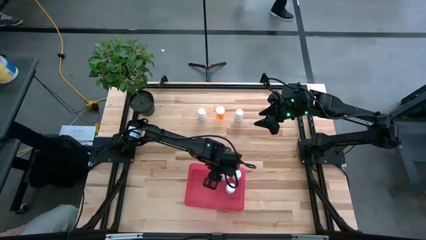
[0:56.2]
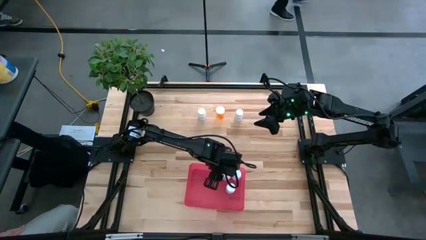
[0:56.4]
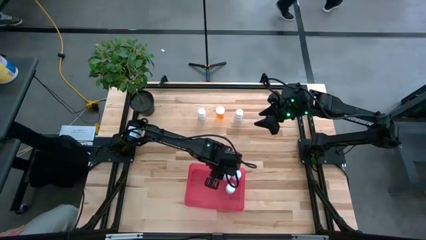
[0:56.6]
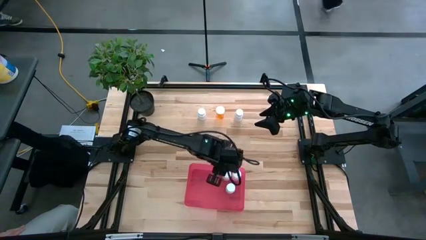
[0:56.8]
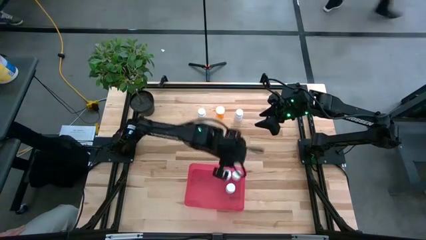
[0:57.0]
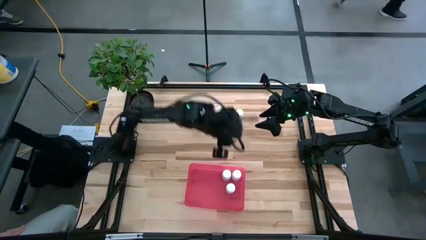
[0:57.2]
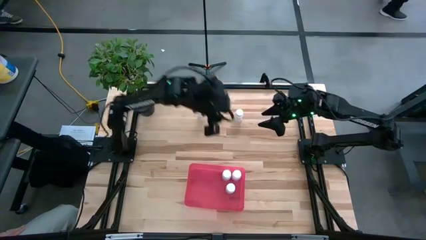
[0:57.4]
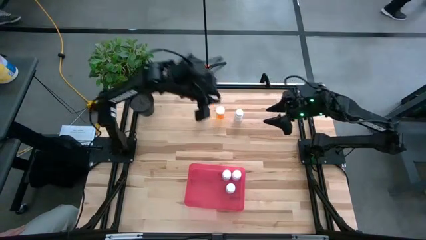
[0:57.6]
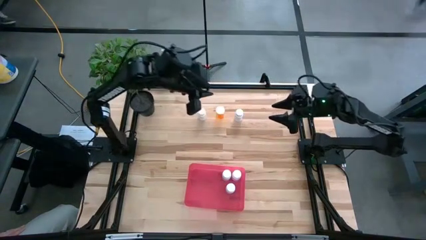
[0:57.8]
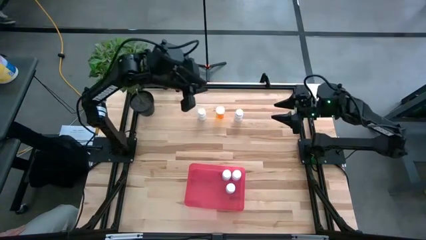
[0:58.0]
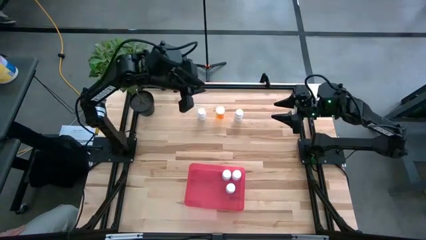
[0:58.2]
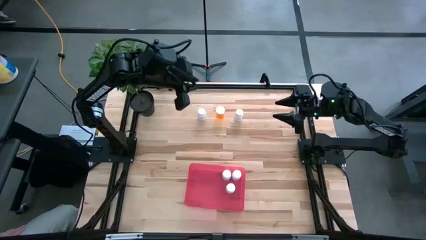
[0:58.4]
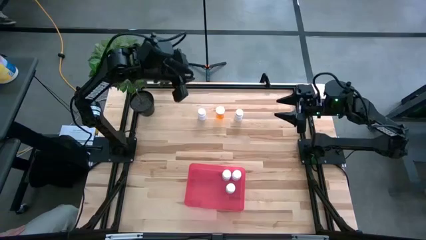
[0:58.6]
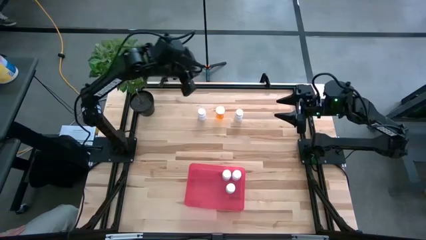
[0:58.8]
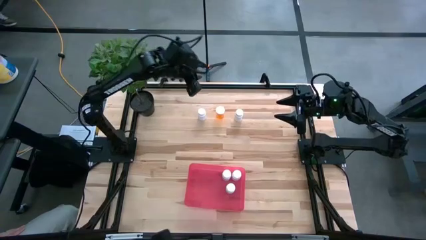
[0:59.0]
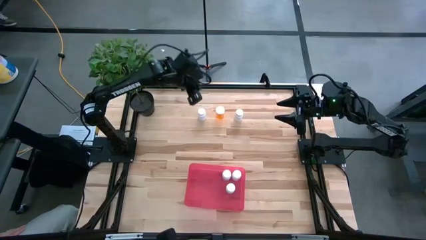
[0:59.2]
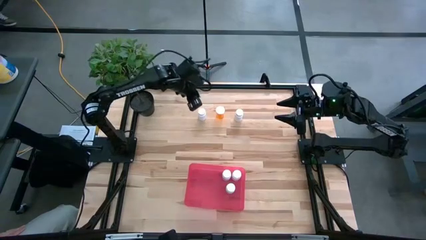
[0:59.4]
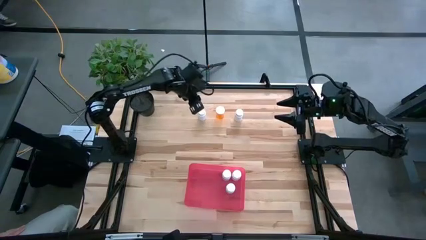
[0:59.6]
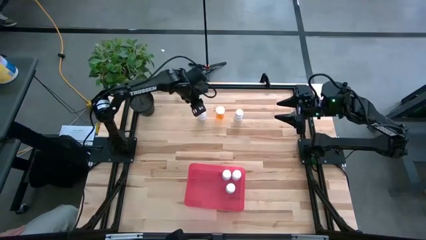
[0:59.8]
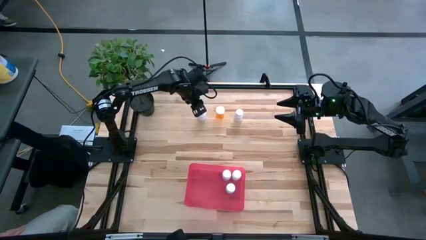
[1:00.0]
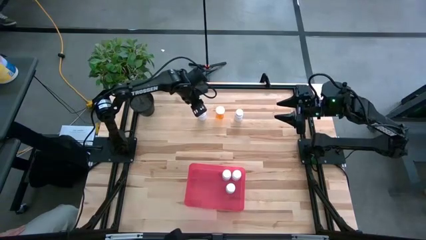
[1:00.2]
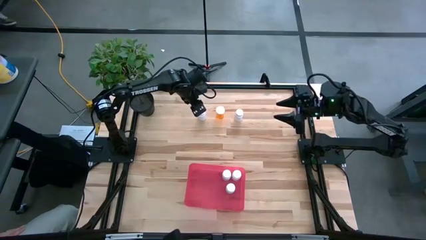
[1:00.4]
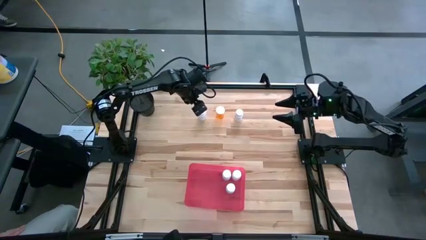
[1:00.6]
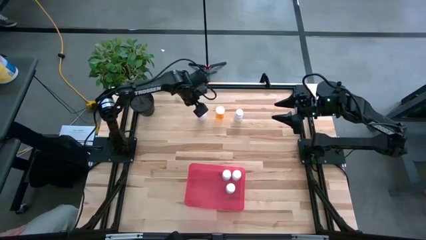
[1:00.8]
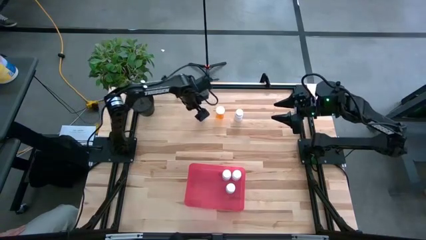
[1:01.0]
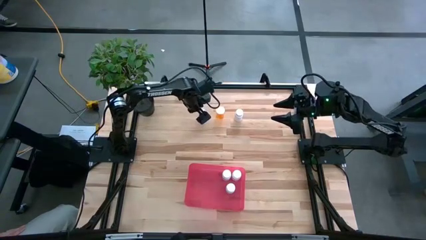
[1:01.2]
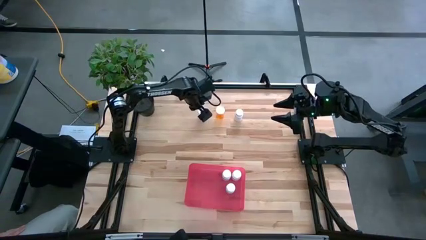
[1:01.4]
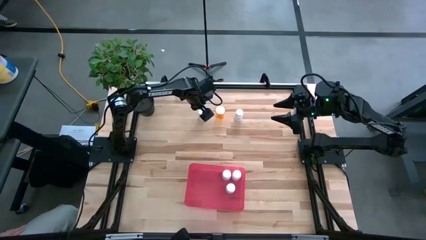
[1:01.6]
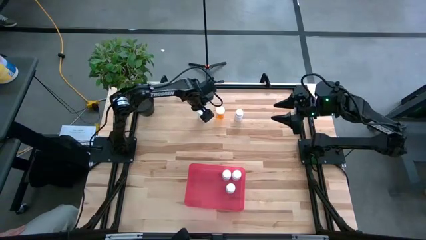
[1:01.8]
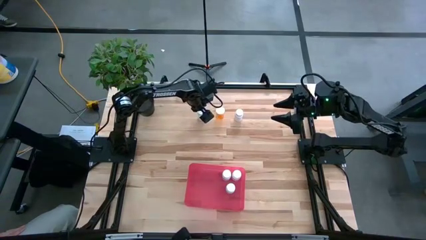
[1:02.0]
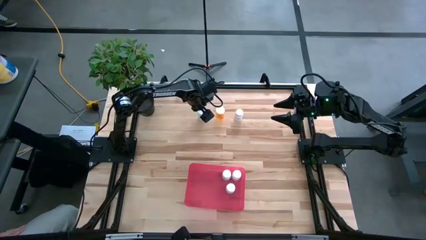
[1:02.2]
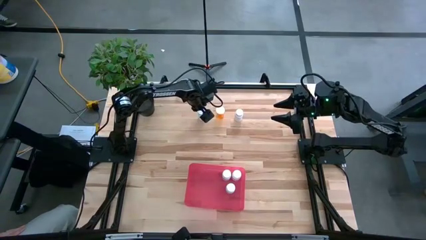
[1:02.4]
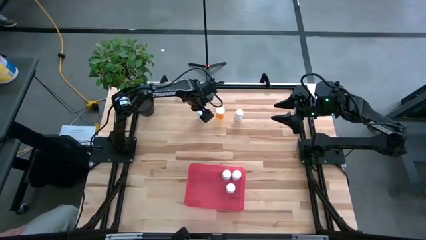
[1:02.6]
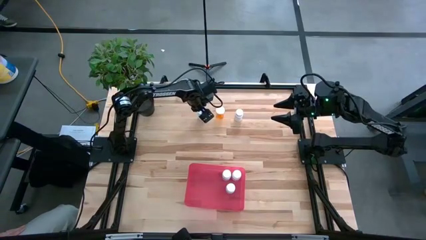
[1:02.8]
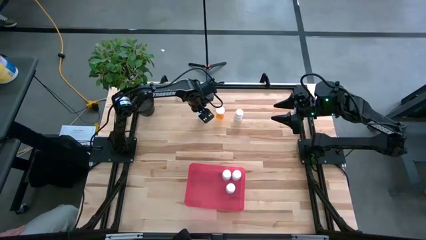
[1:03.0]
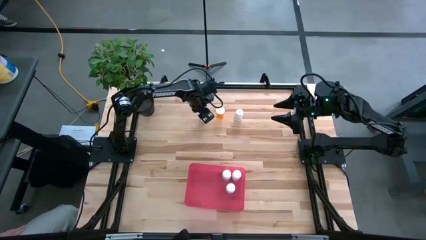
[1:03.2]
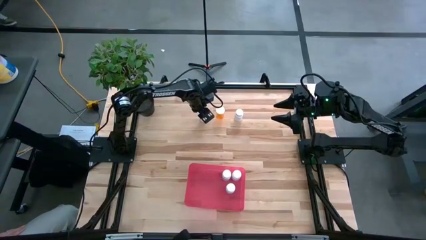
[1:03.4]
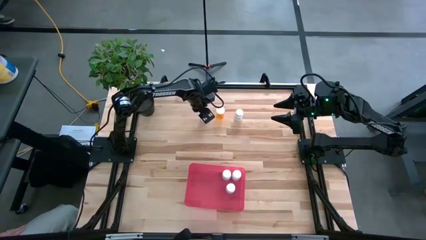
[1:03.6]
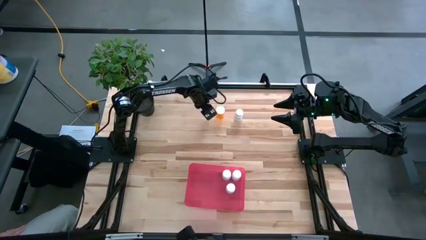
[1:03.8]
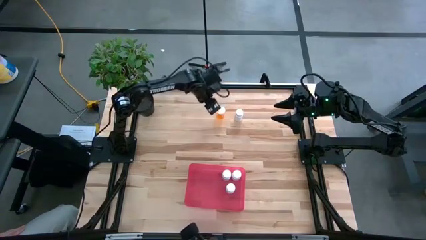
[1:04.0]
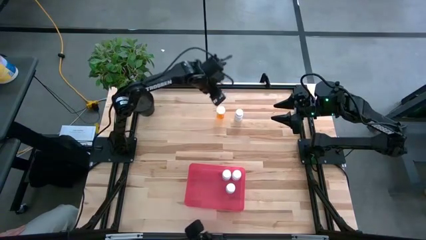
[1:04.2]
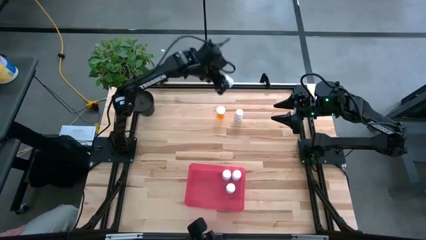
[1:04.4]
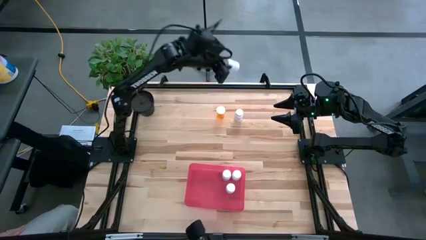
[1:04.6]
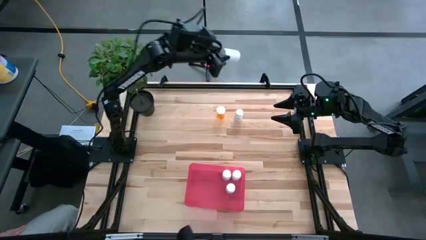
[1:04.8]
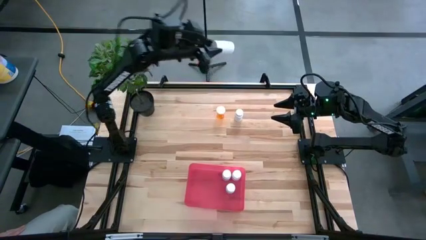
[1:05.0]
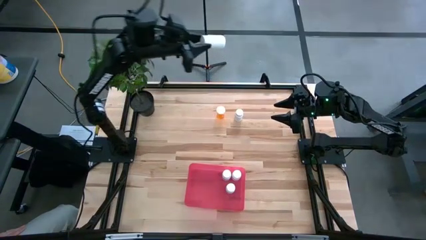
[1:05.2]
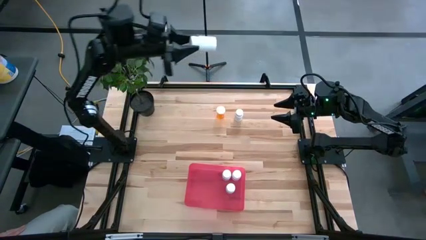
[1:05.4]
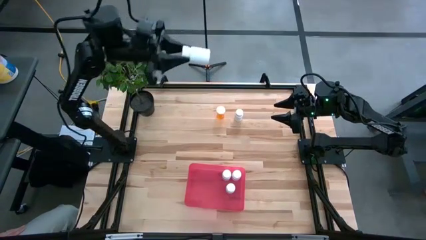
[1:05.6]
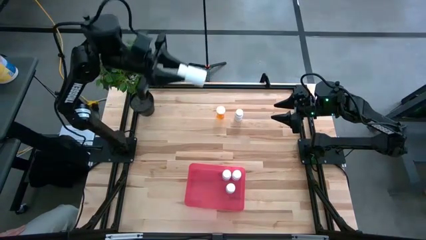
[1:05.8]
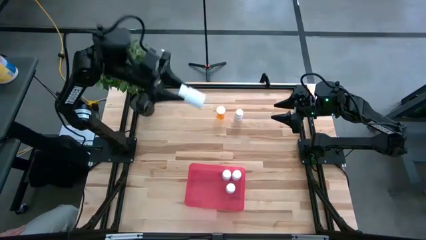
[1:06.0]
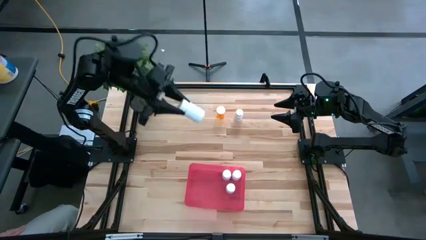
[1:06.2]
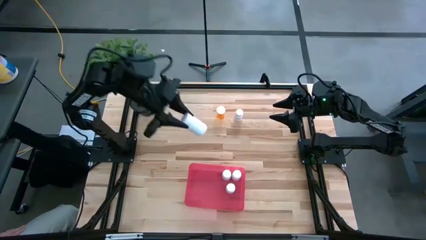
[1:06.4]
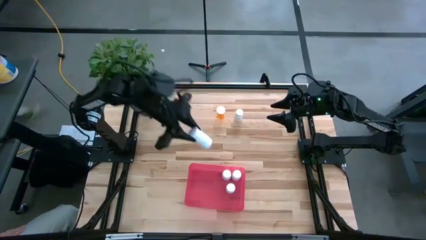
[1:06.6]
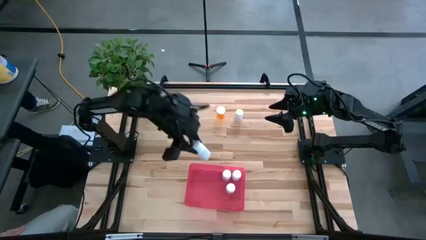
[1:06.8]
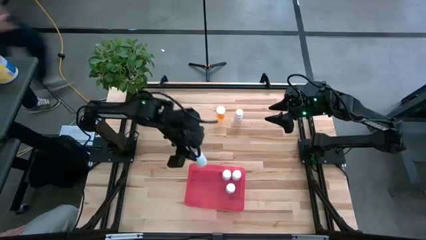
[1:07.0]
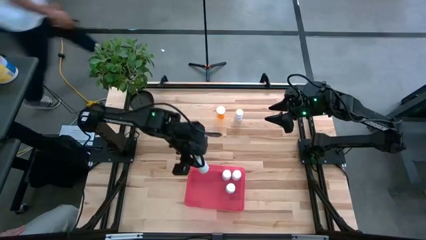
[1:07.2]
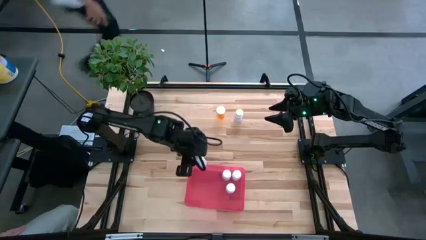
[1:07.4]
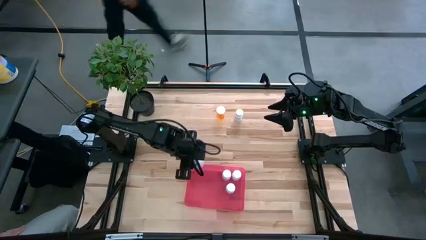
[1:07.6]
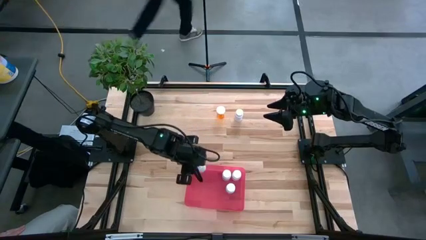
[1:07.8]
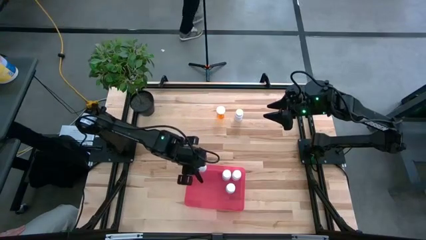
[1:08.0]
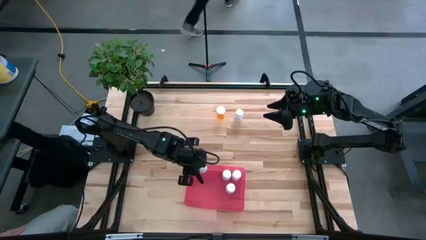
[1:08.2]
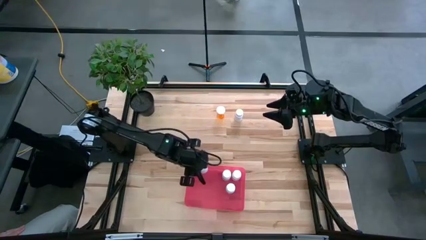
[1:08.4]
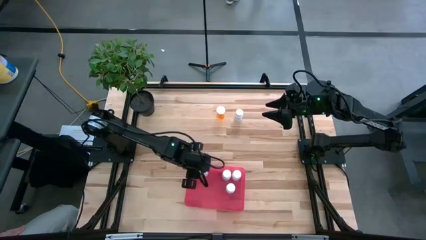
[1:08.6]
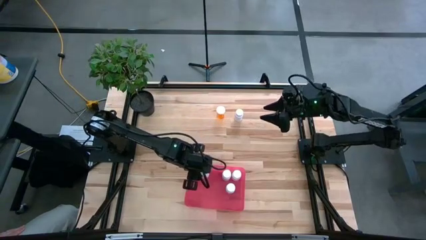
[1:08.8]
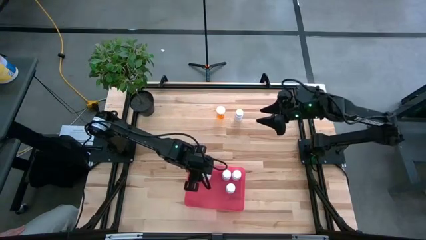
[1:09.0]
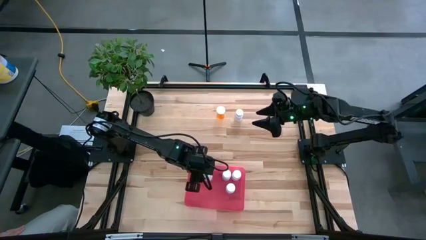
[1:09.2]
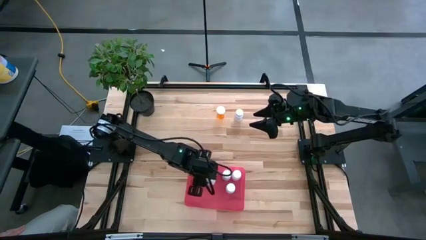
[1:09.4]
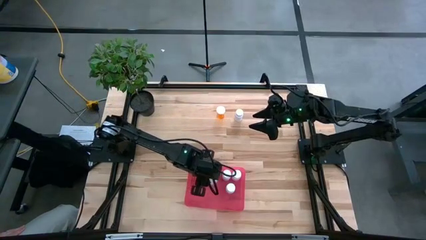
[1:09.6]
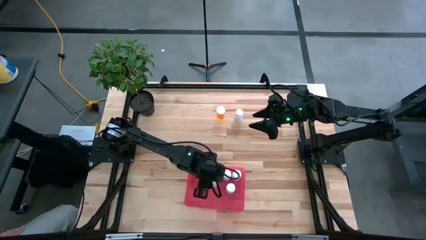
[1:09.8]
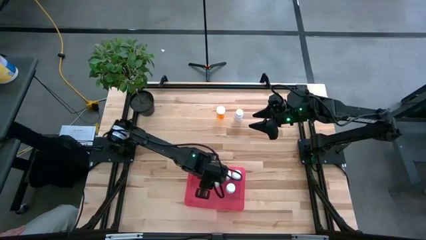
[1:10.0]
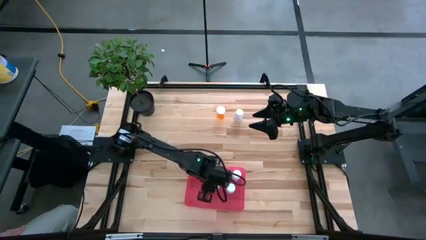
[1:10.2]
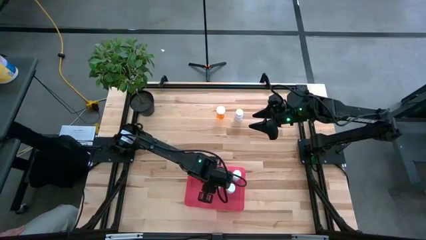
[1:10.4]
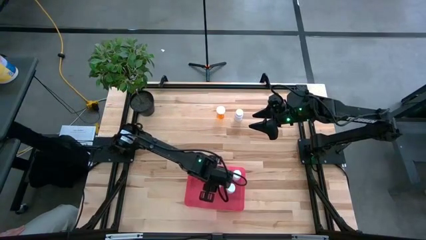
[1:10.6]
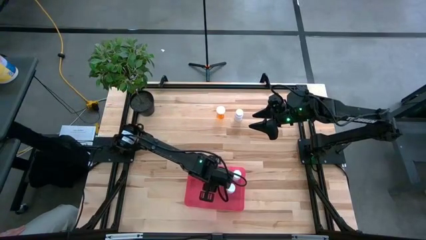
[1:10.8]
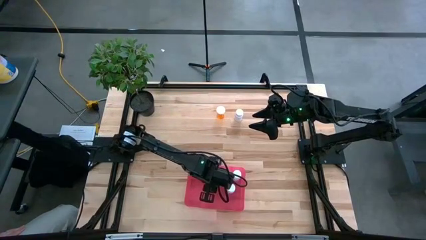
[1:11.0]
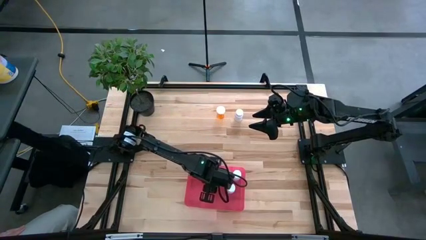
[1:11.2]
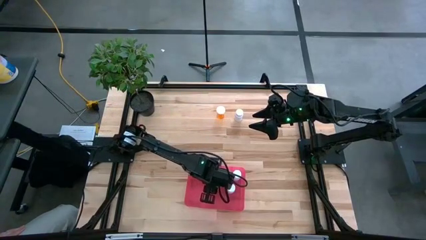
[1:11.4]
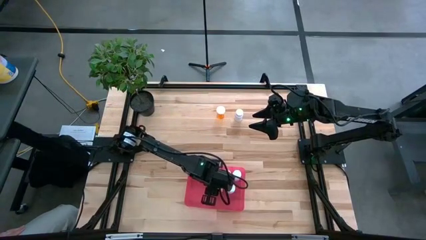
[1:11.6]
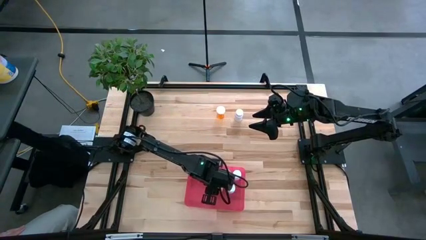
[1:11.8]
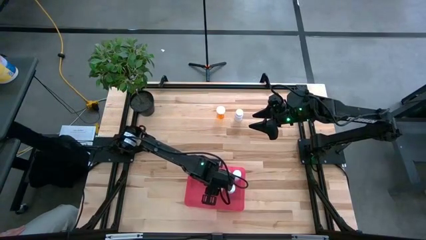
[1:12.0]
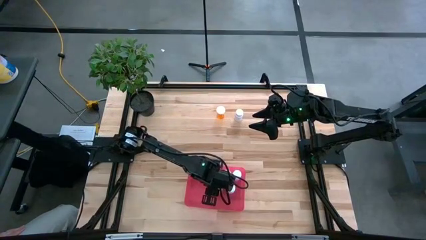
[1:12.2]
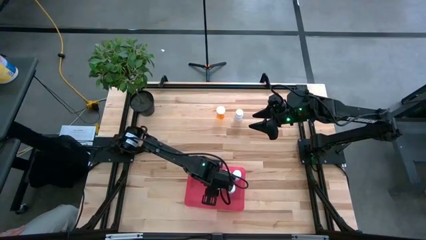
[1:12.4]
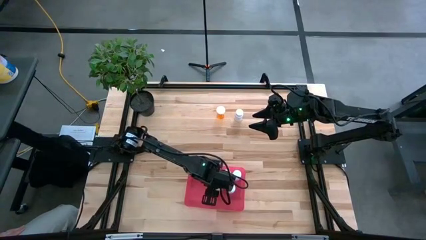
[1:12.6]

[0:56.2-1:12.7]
Task: Pick and place pill bottles into a basket
Put the white pill bottle into the red bin
